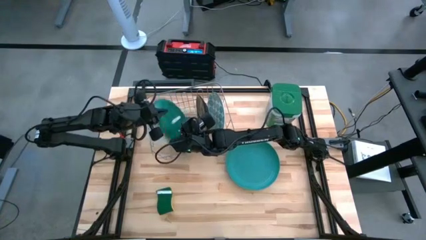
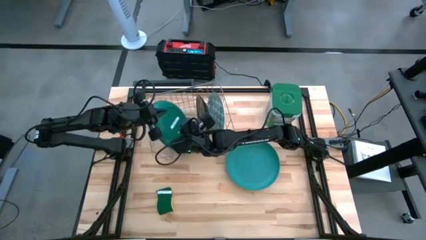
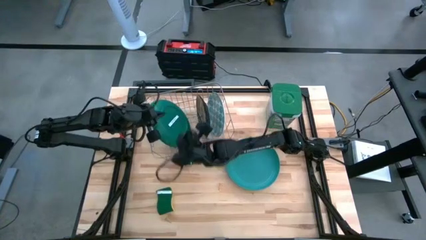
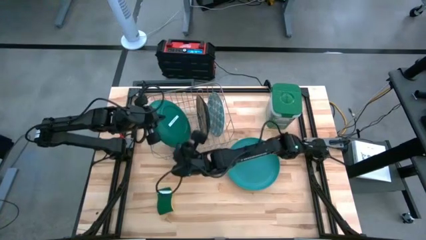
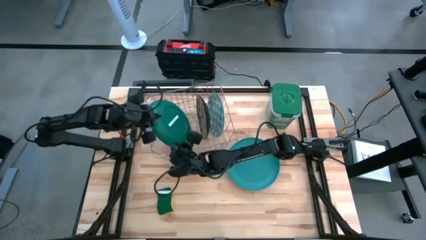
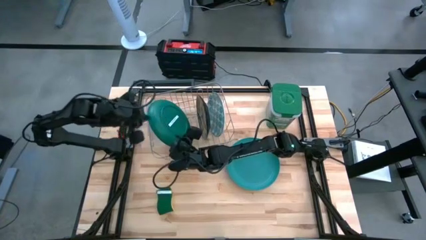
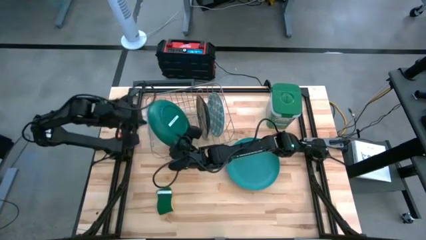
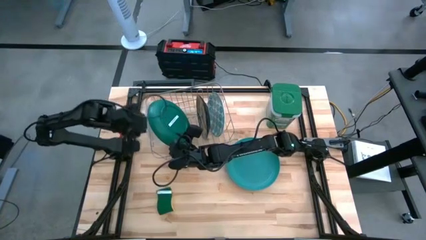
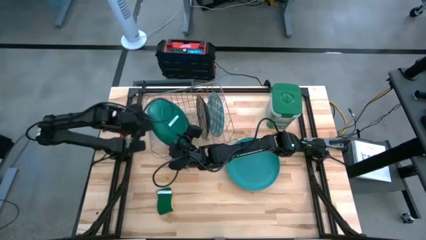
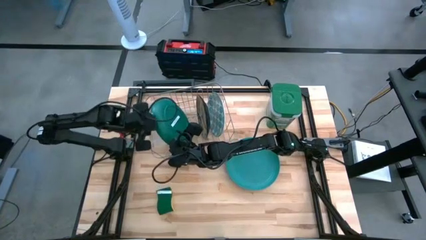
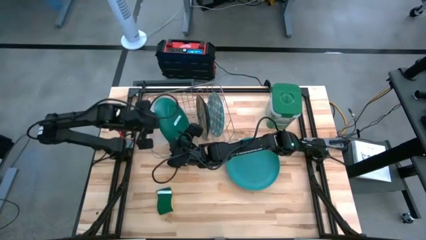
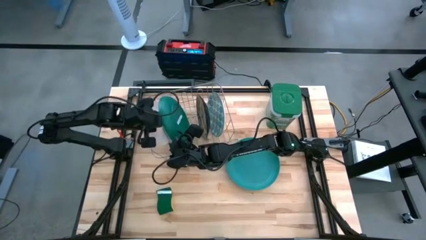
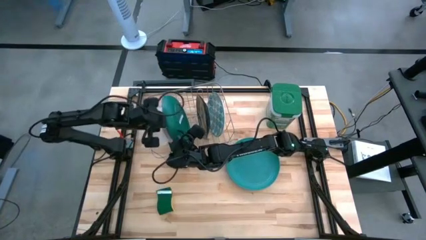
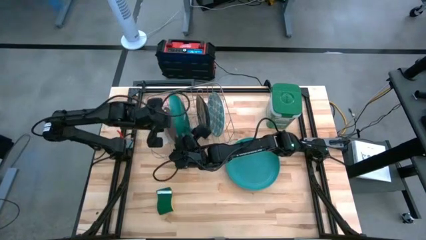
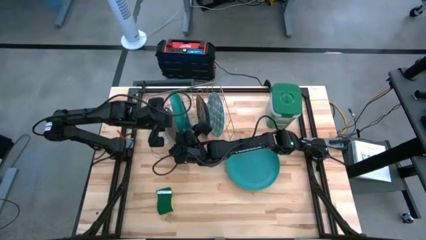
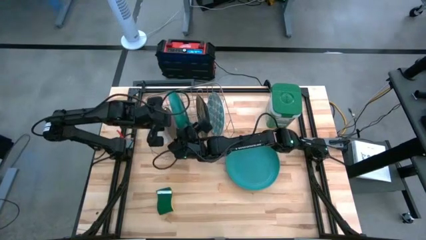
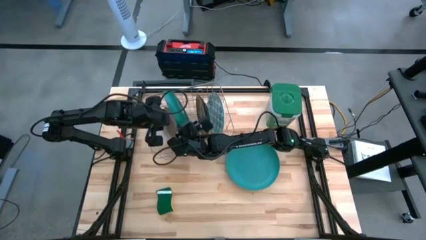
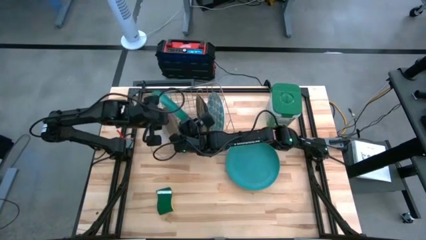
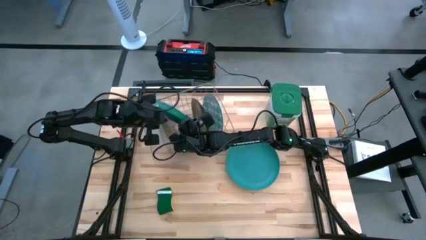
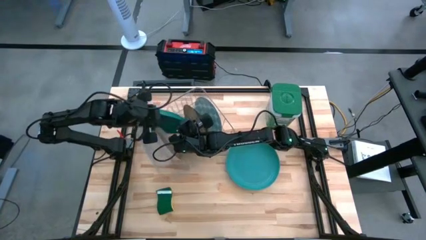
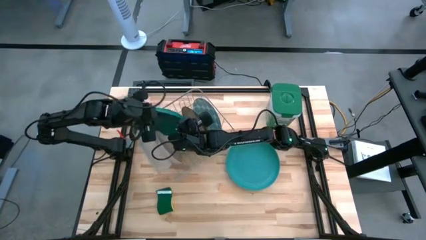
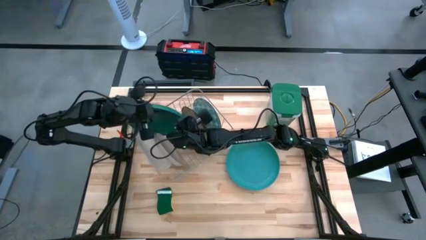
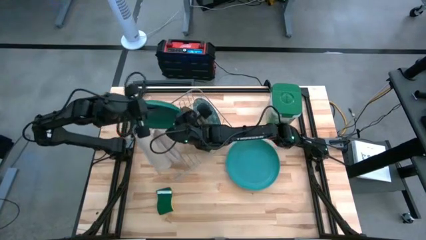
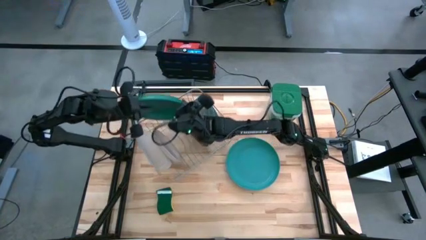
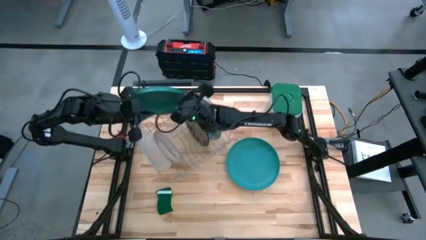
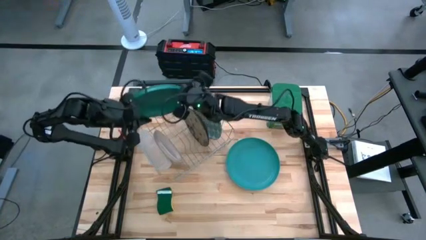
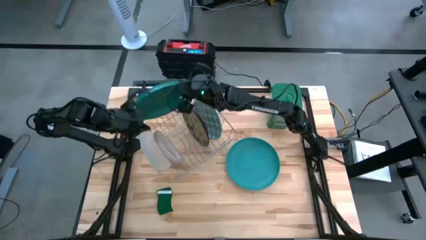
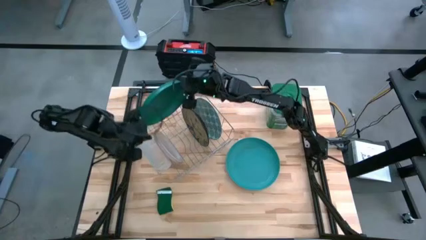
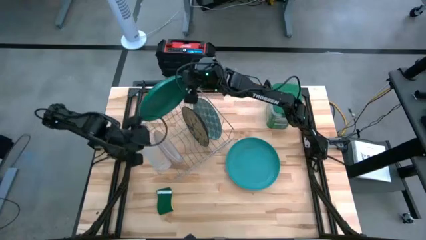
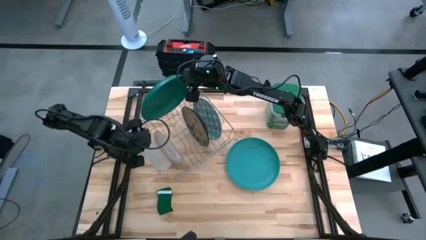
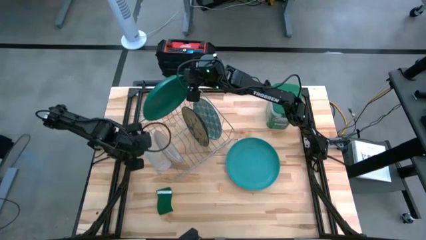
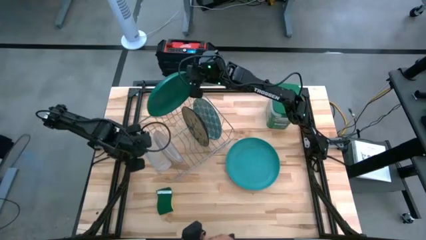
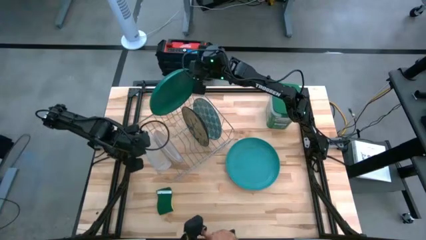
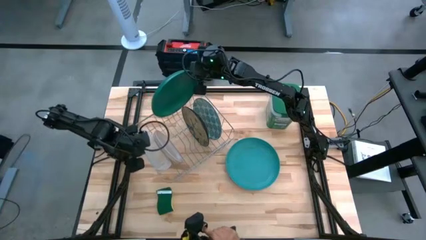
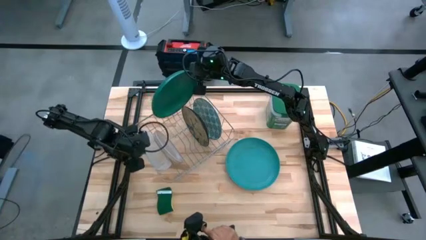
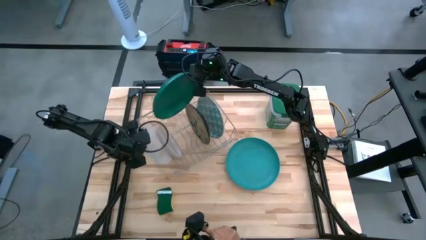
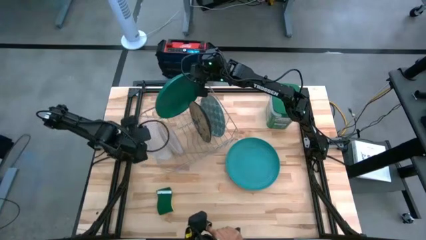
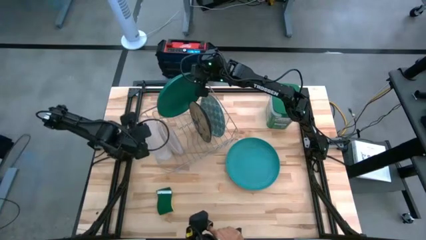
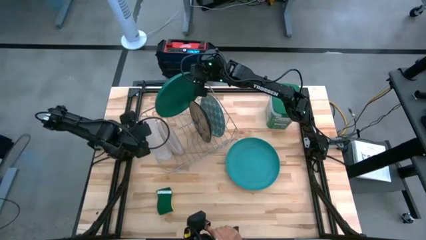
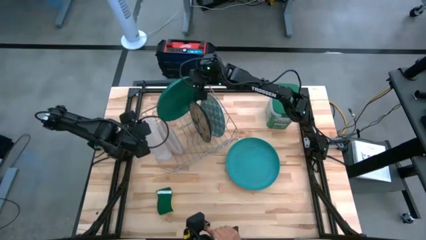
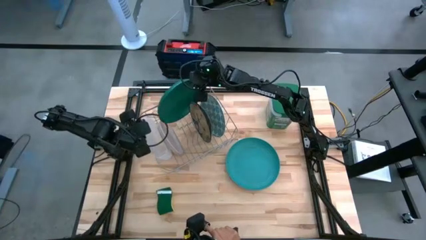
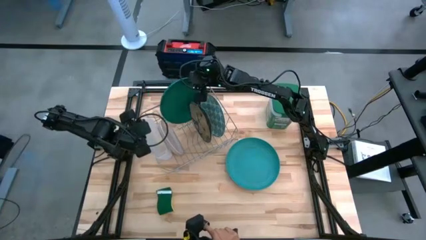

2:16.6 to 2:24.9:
Task: Sort dishes
Put the green plate on the dish rack

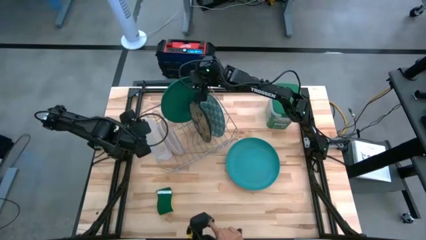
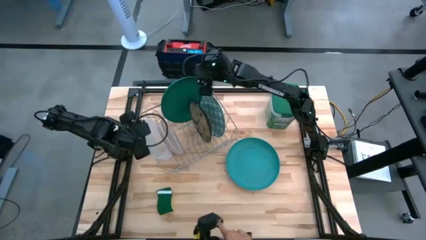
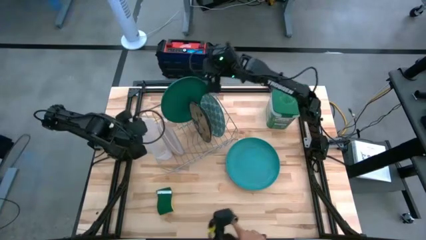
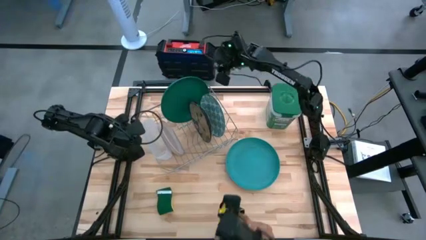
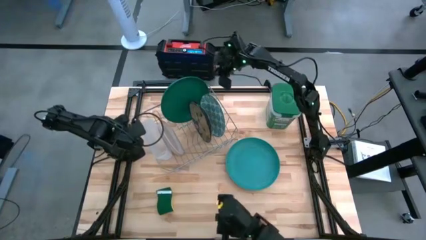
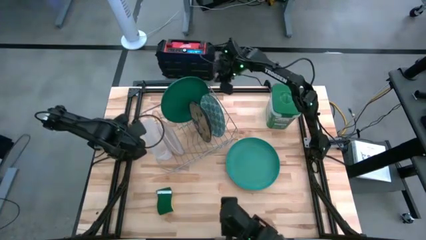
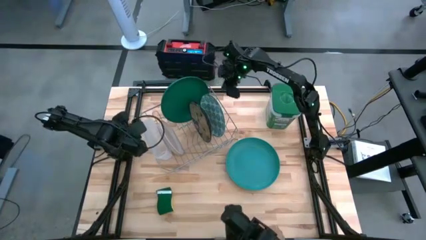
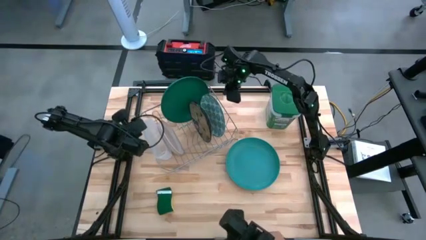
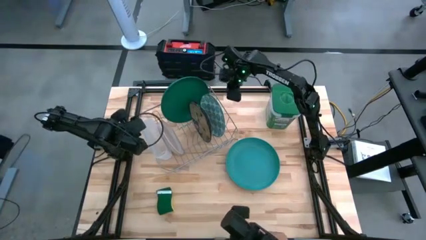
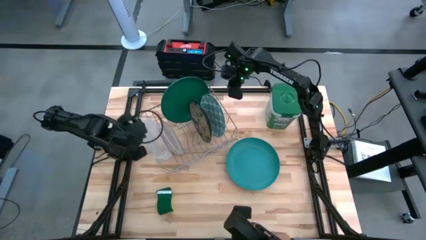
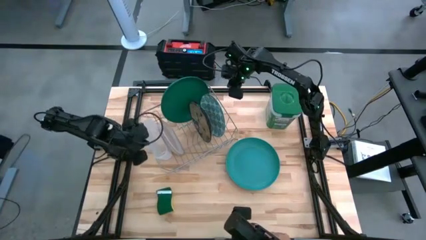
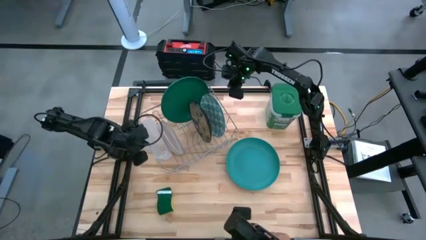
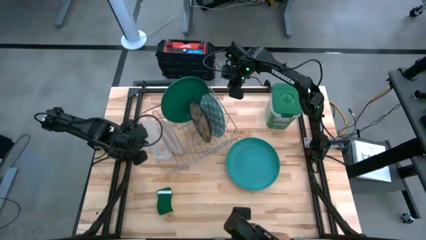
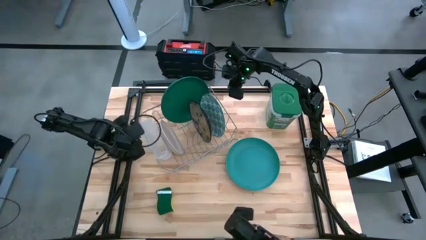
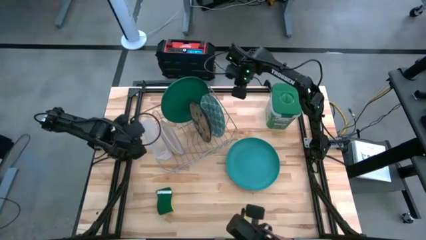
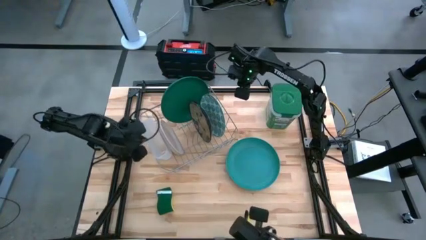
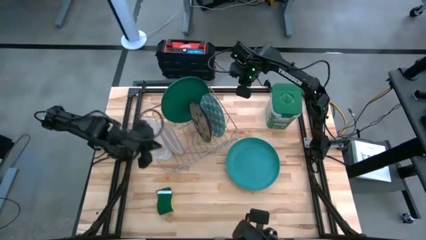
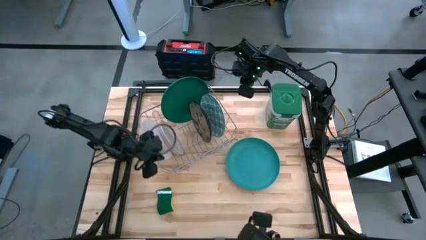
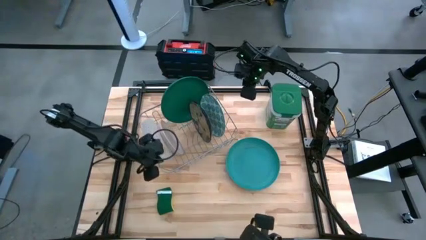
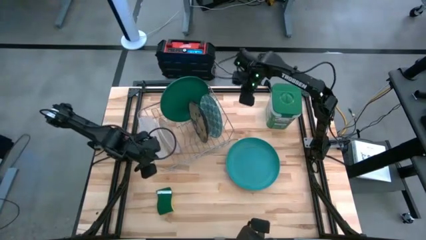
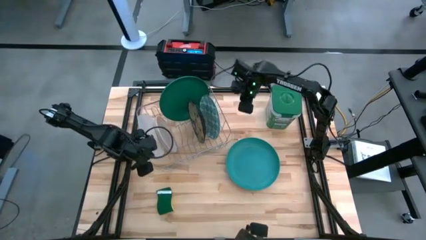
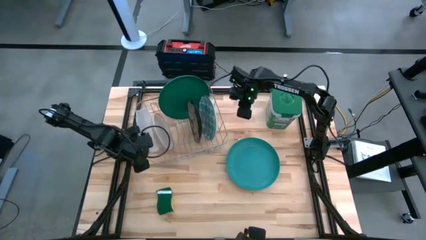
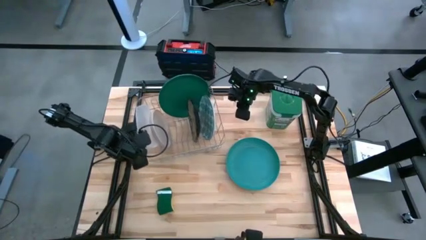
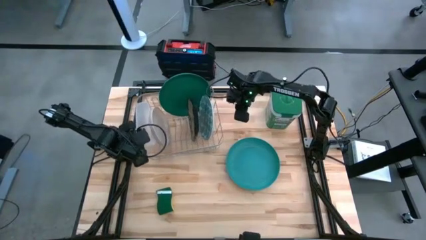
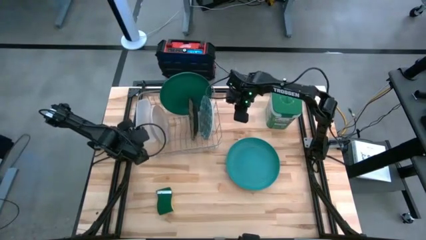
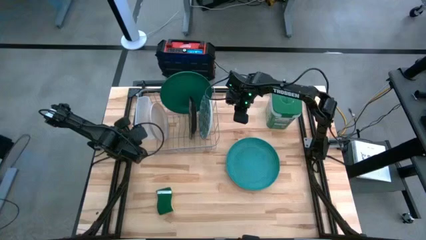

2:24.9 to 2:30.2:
Adjust the dish rack

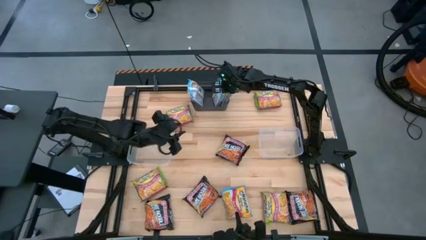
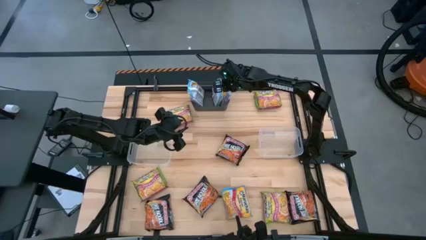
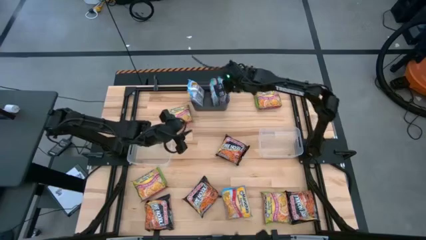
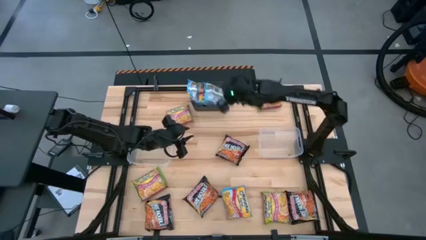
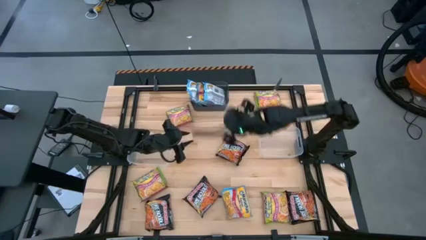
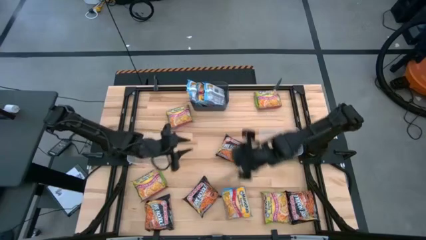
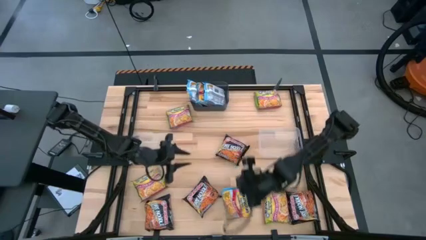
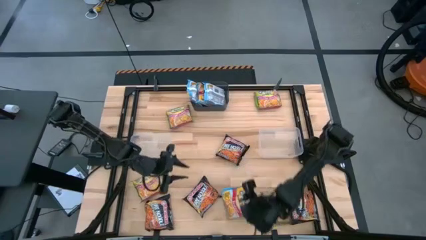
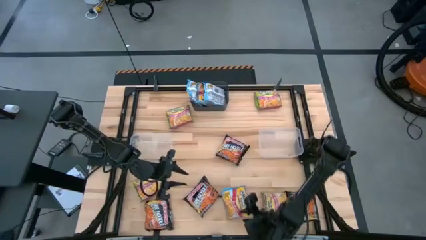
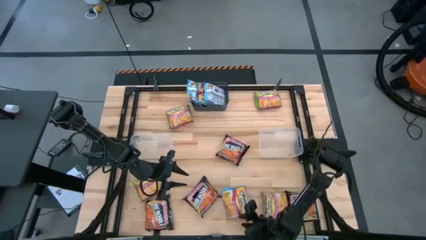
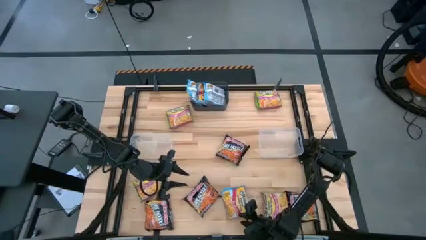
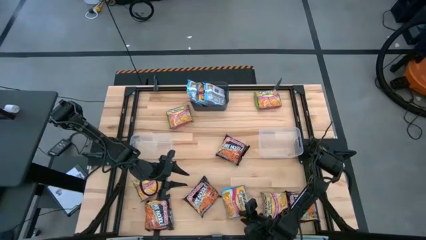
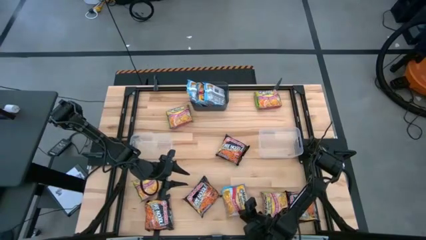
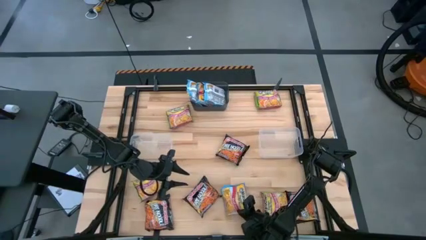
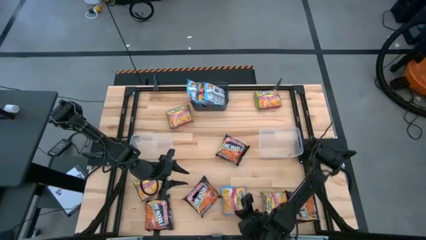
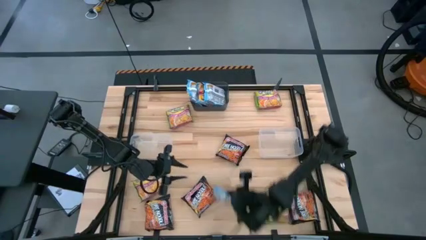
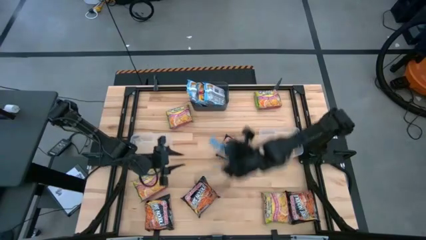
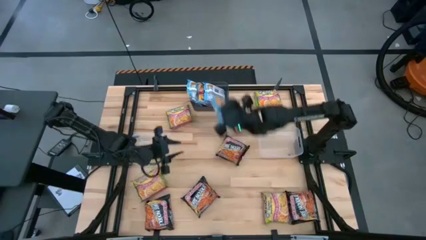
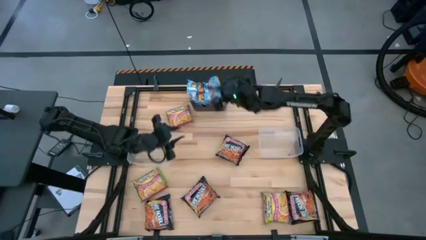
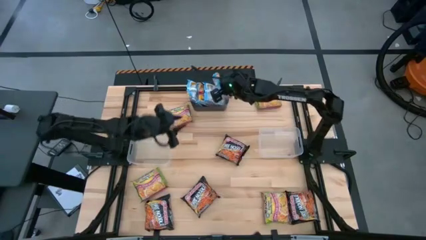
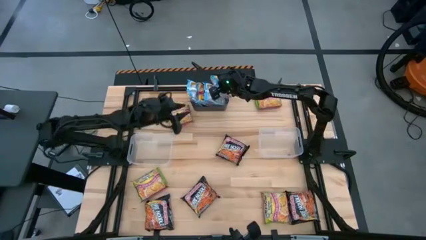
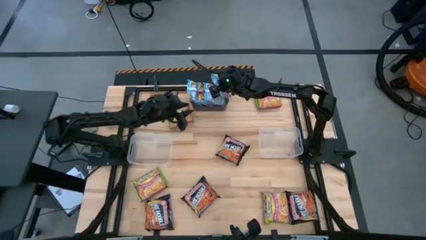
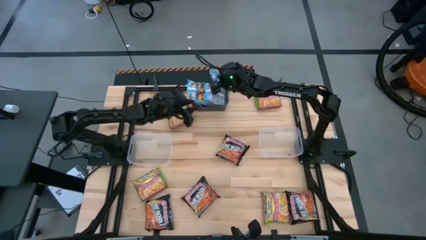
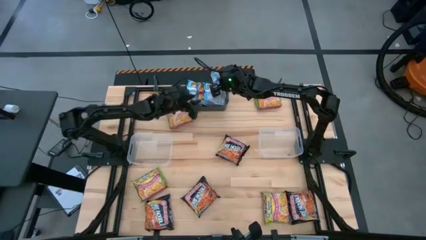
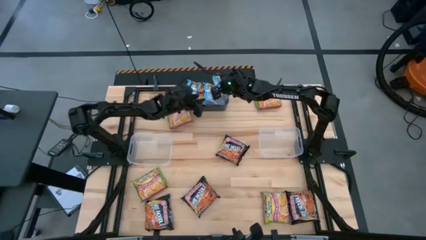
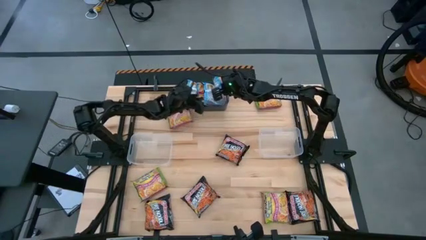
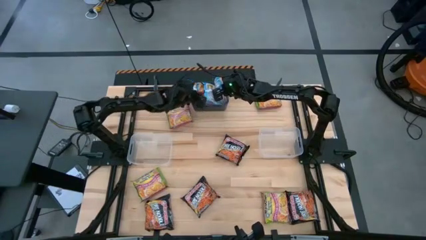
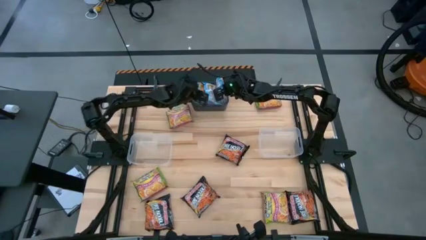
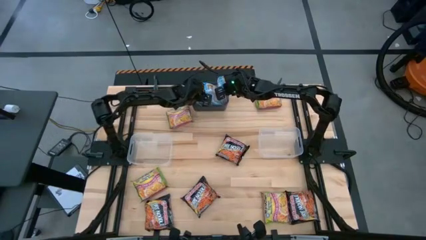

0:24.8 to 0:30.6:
Task: Sort Maruchan noodles
Put the blue noodle pack into the black bin
